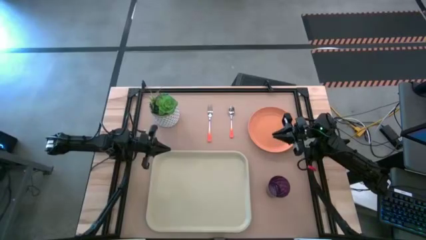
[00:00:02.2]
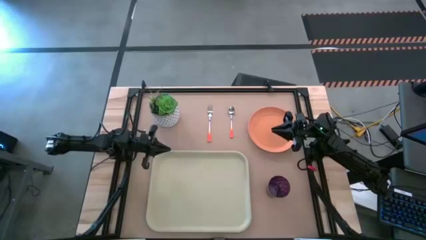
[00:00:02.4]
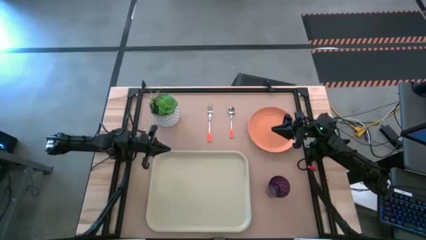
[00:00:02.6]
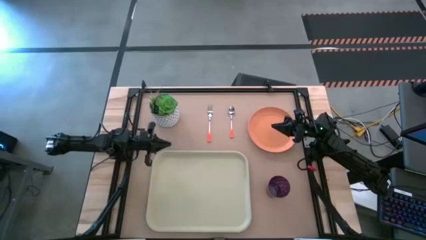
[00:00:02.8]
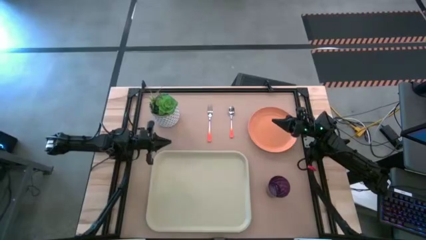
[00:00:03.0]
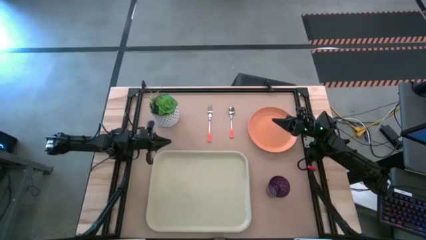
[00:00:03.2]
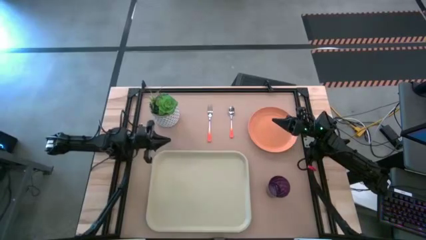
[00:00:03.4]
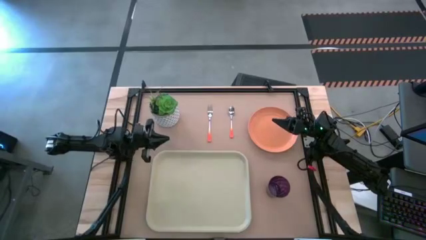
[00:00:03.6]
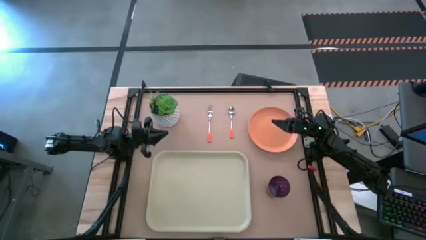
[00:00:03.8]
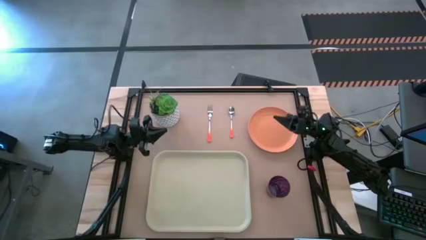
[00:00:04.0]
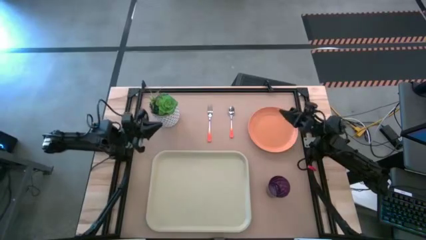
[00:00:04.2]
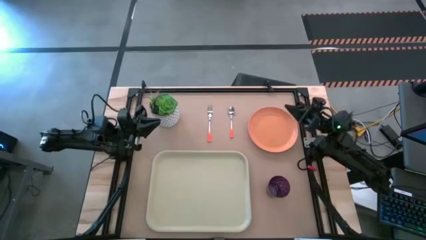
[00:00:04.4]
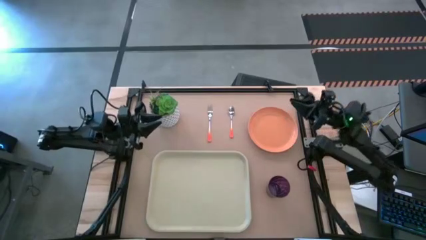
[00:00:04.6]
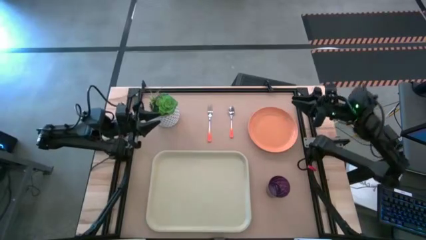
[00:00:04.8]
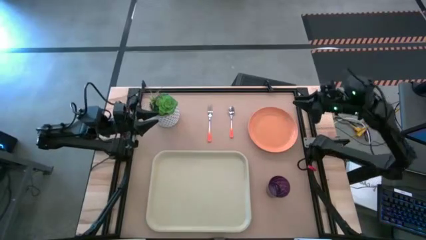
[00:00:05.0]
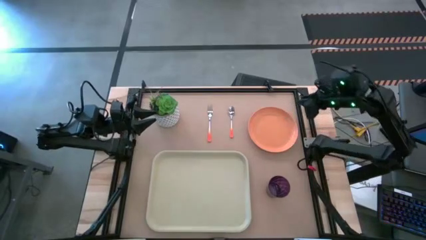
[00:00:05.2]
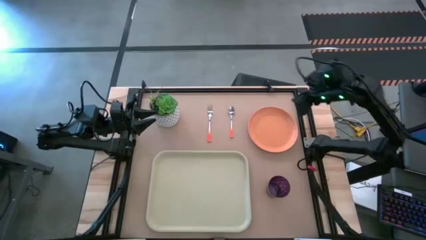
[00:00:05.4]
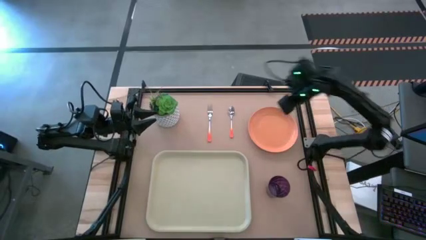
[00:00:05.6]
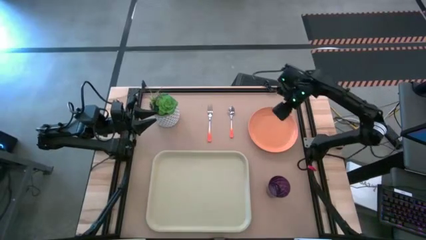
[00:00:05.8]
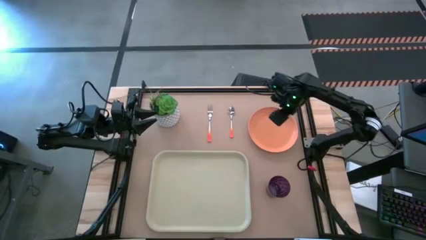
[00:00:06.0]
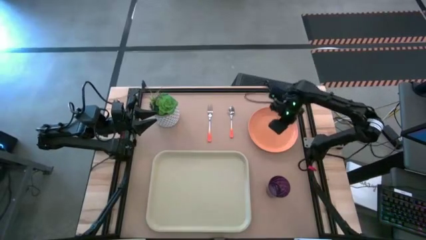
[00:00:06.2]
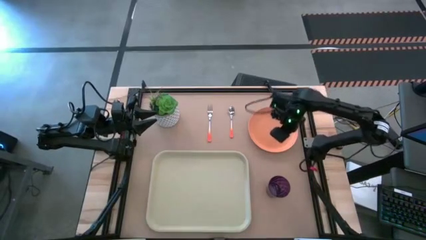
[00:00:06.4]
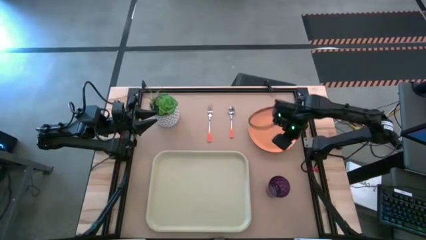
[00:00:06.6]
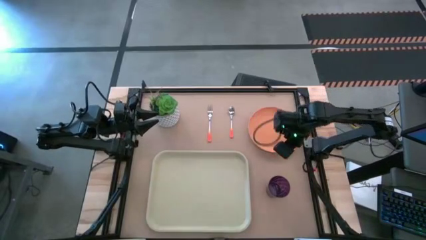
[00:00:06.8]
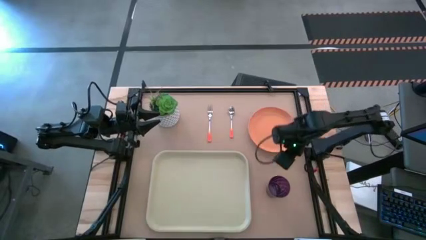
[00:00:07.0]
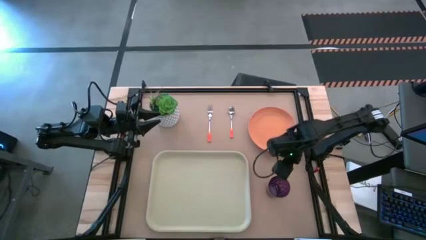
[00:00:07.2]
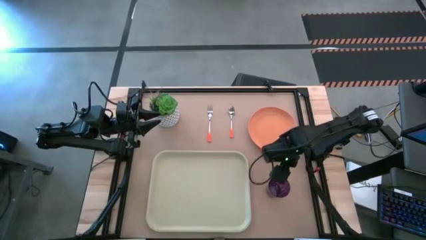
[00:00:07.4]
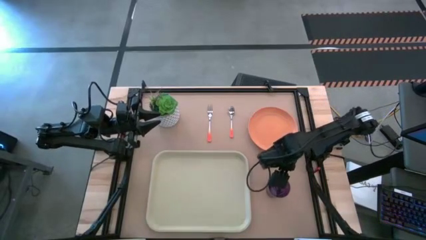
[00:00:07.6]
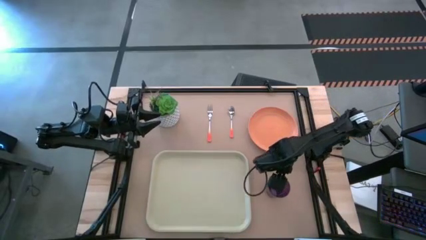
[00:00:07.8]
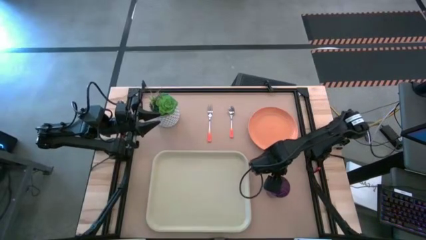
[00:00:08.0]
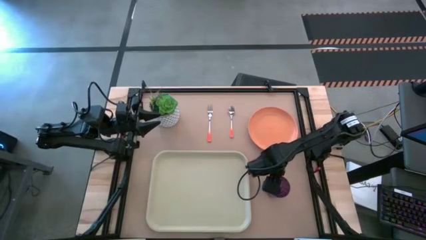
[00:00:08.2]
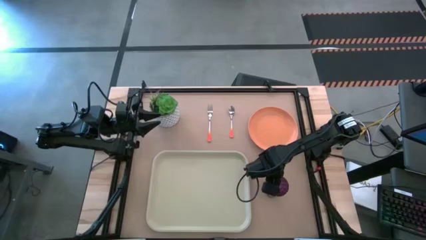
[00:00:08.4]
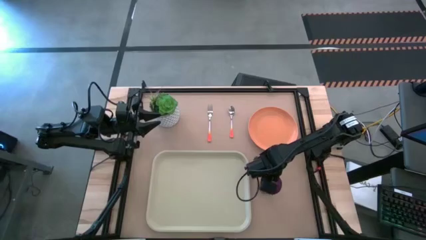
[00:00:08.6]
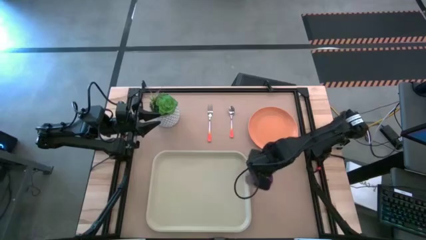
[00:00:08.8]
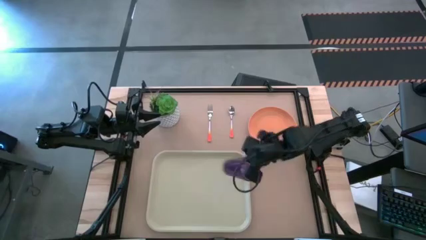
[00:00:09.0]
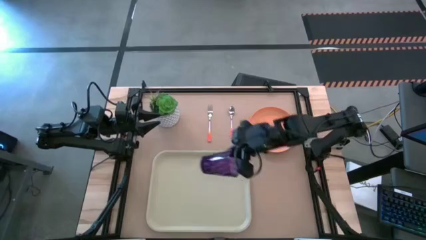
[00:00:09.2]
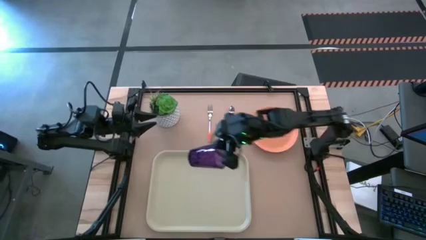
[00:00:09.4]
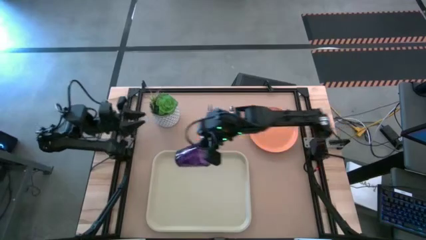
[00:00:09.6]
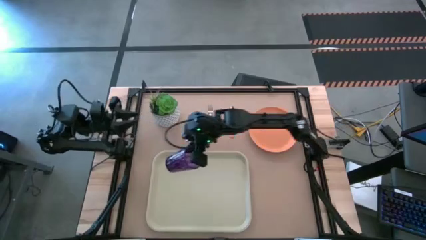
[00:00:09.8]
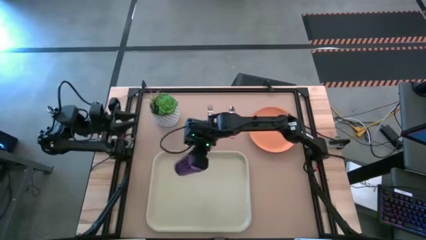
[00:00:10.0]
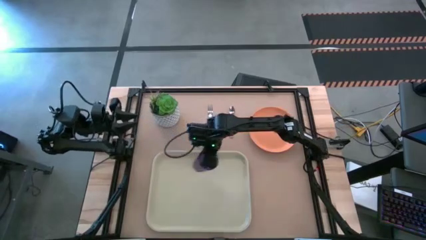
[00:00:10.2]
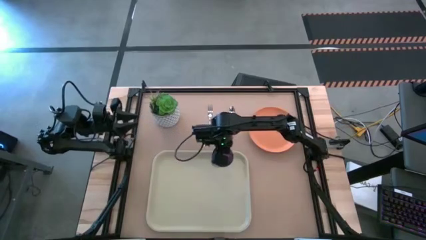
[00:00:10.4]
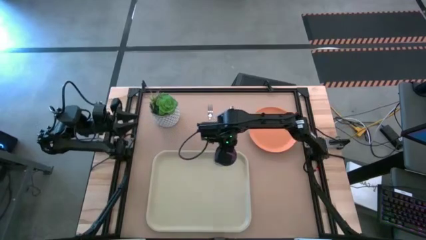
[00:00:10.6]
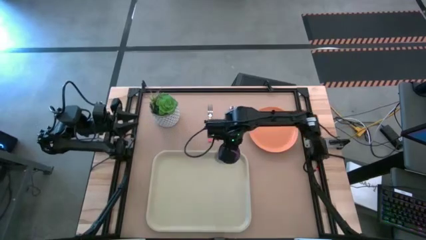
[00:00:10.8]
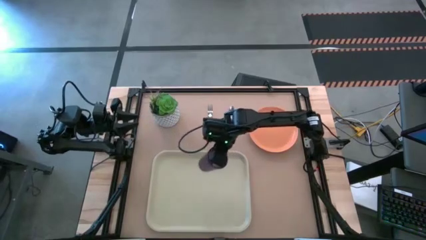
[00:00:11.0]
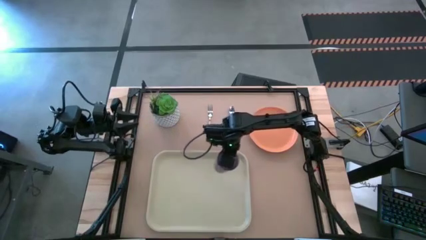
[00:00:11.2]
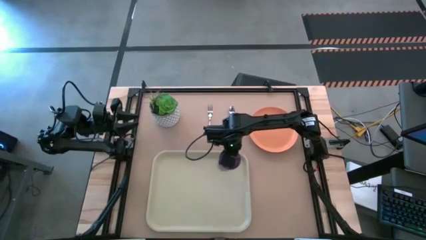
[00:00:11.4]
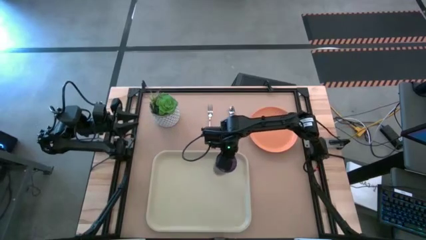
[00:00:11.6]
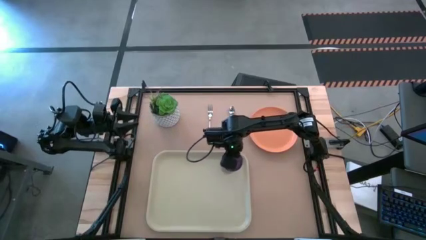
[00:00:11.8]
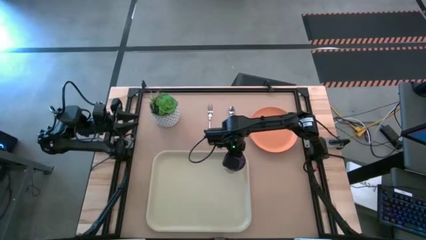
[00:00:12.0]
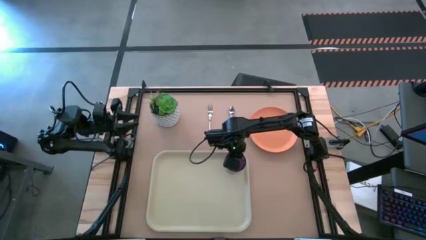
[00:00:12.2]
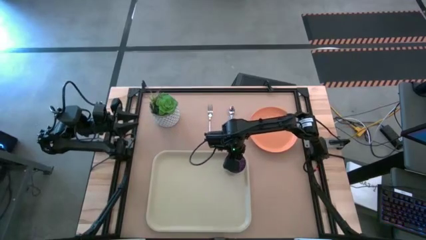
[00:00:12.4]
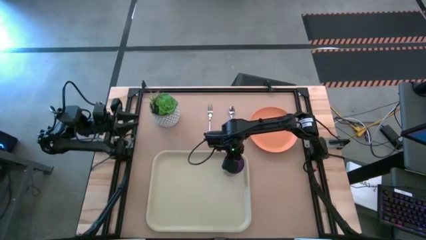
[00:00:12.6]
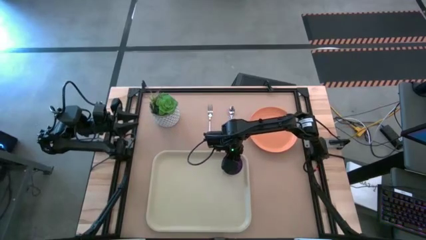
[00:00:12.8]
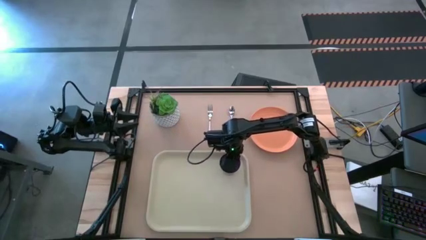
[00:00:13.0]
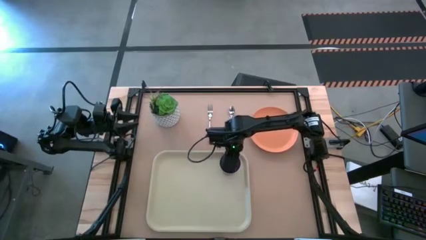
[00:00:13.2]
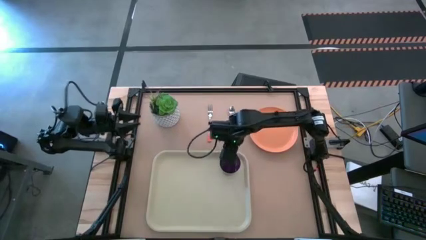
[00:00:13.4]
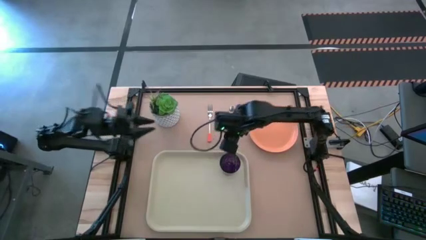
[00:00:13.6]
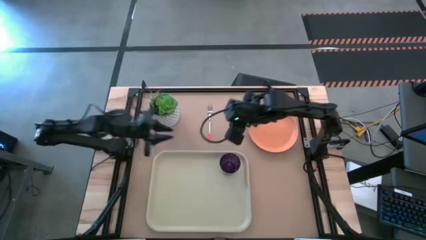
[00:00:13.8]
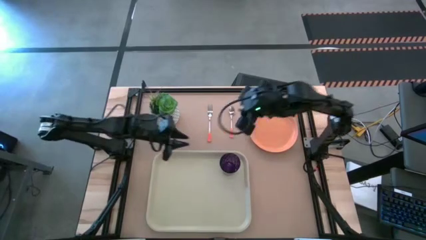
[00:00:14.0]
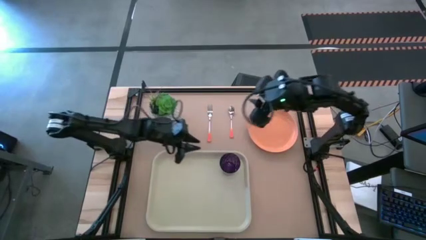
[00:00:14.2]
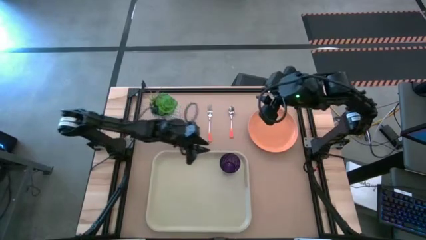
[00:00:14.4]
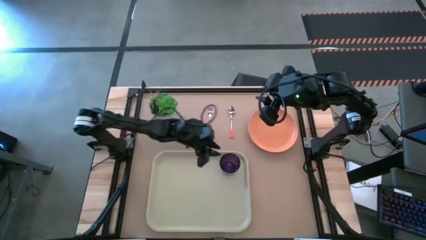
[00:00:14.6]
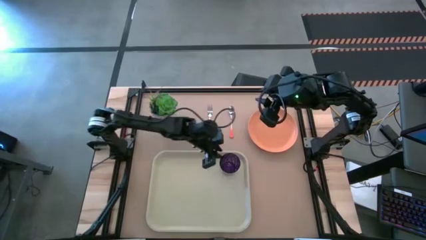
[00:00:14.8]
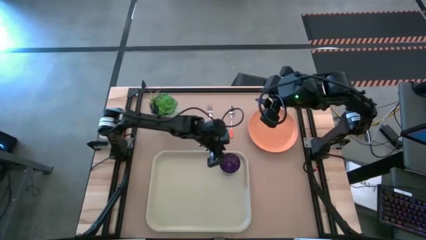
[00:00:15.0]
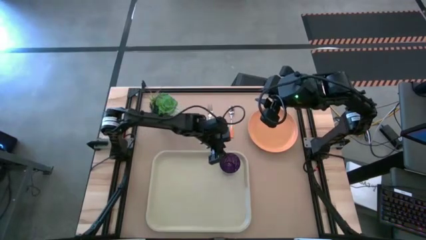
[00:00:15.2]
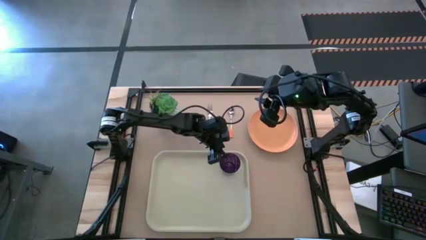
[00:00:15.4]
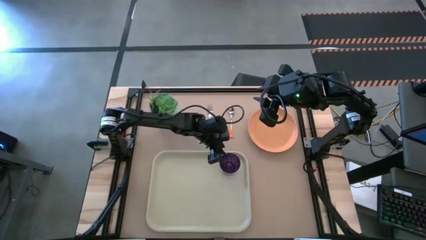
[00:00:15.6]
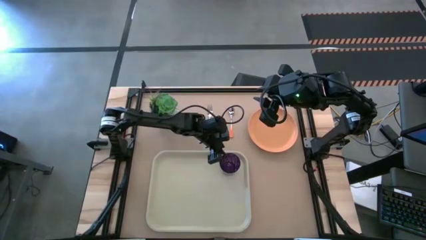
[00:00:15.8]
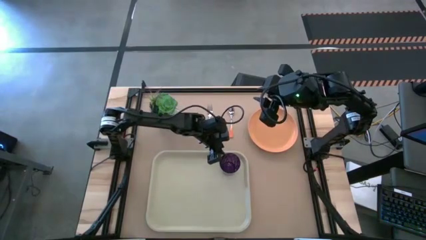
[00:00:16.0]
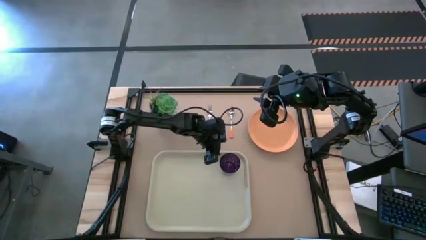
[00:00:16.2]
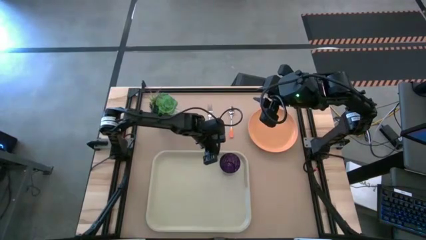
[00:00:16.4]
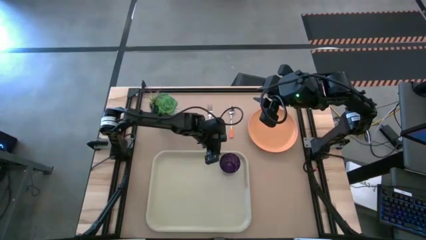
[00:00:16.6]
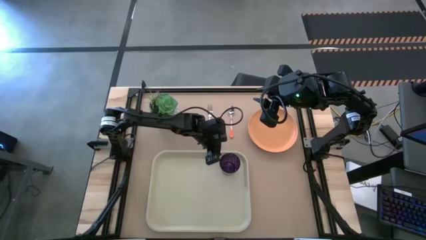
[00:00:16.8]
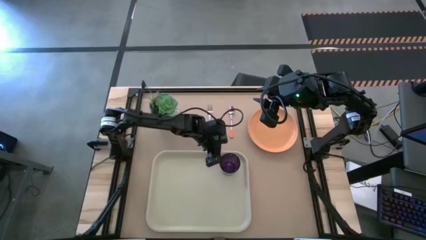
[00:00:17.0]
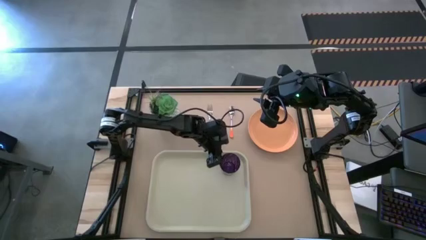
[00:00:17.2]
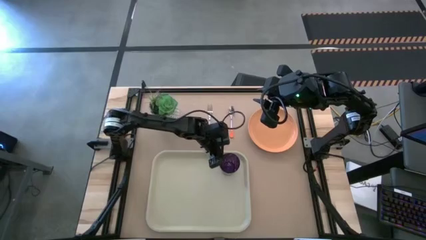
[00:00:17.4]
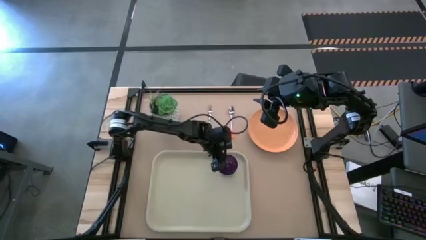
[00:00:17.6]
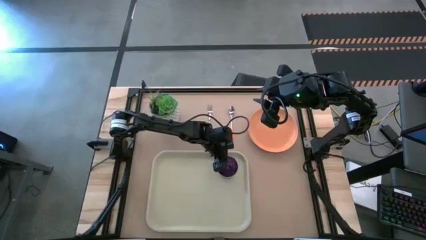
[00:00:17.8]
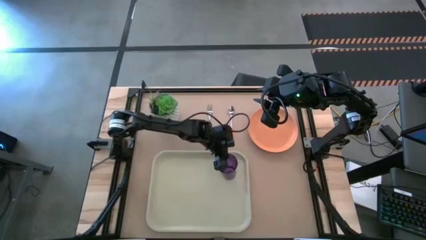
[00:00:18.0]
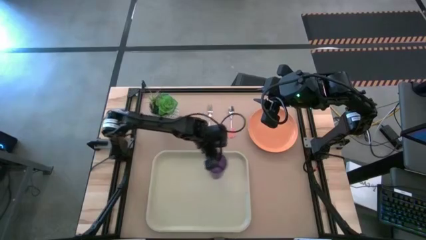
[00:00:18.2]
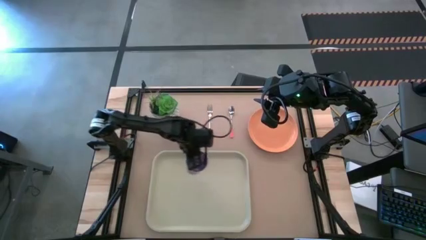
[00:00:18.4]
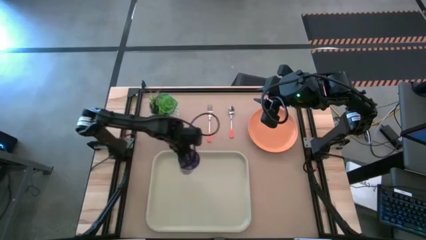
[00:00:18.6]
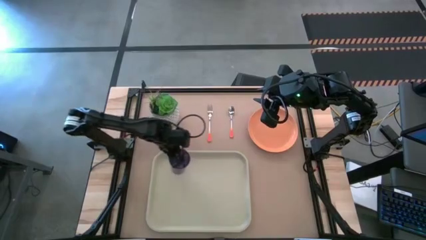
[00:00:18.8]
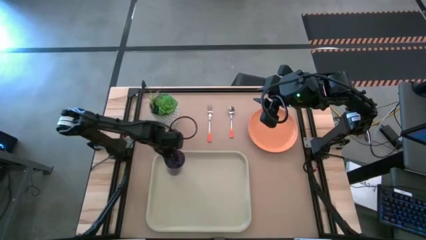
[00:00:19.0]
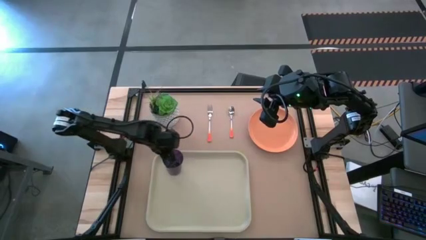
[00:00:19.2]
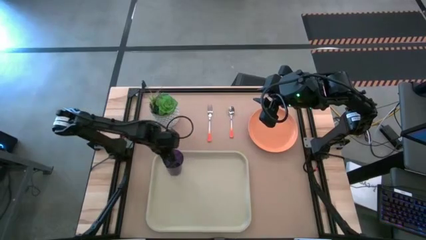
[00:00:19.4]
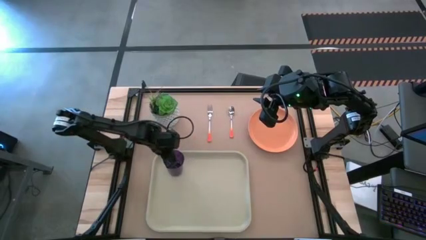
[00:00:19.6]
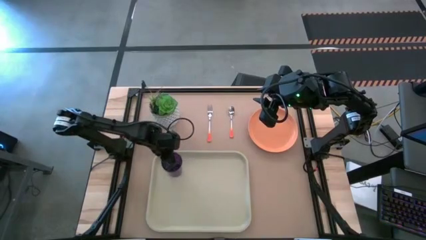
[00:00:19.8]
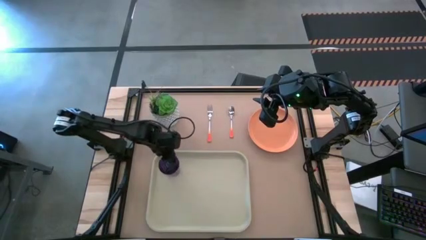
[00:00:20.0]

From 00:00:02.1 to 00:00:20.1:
Task: Pick and place plate/cup/fork/spoon on tray
Put the violet cup on the gray serving tray
